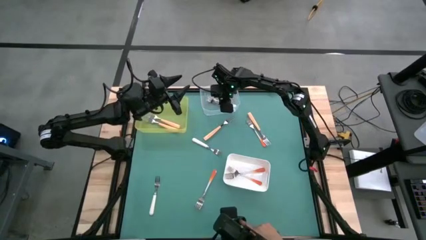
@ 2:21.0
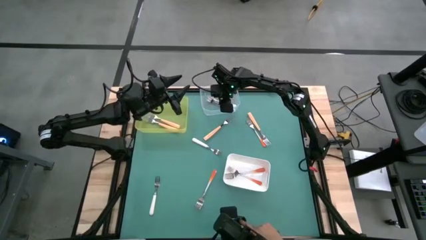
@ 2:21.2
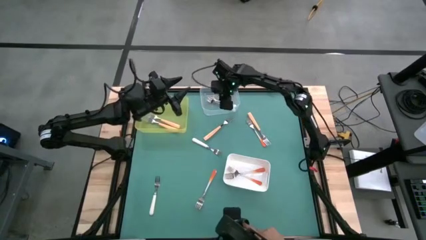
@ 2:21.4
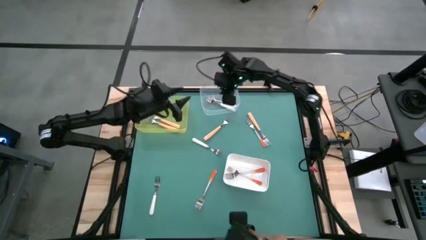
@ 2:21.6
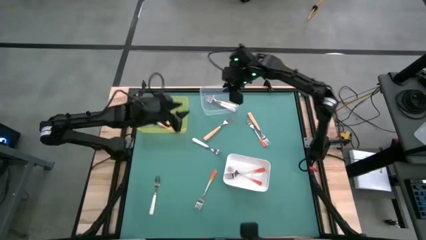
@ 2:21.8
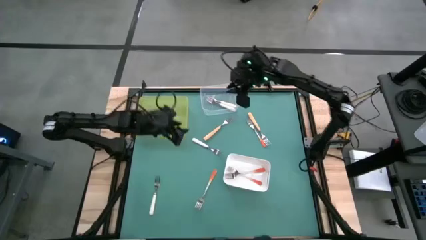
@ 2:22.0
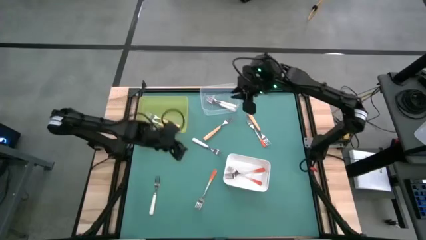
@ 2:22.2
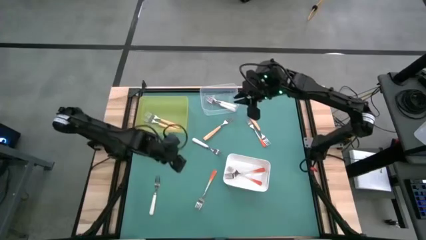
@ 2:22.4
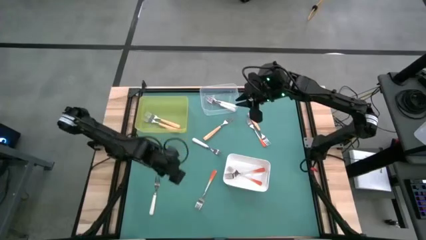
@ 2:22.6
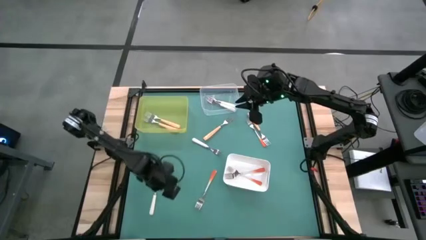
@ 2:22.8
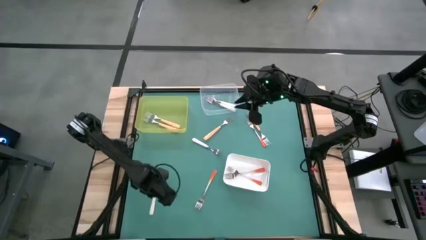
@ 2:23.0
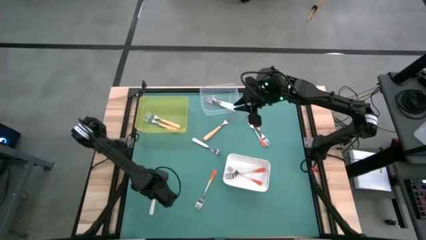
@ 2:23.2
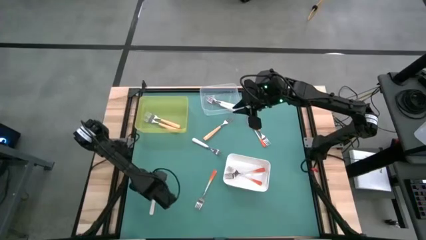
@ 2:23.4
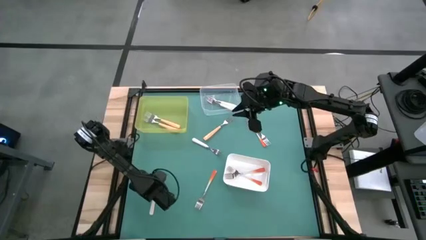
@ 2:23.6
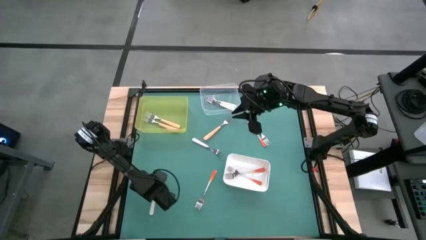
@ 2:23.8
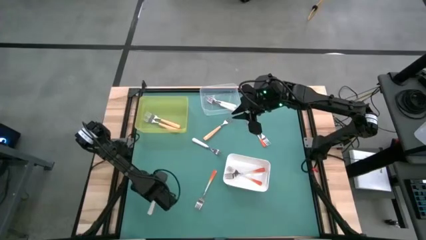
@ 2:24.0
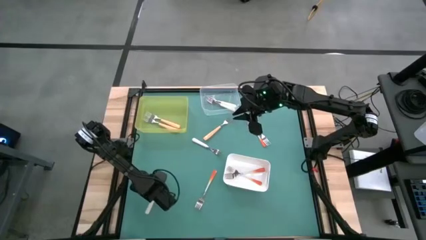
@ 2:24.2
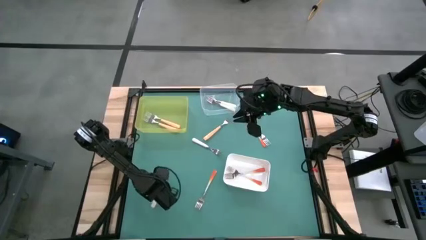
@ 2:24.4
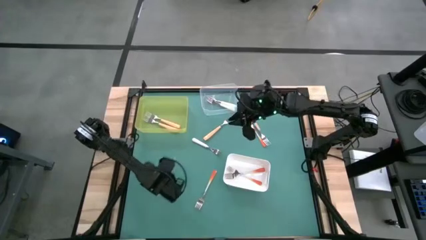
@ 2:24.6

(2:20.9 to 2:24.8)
Task: Sort silverware by color (type)
Put the white fork into the transparent bin

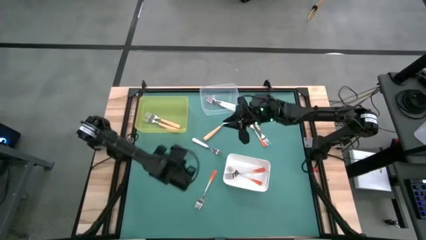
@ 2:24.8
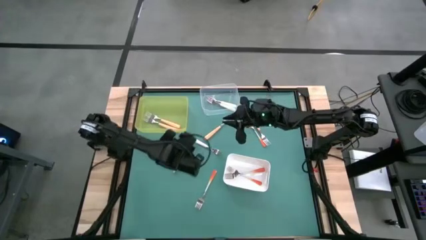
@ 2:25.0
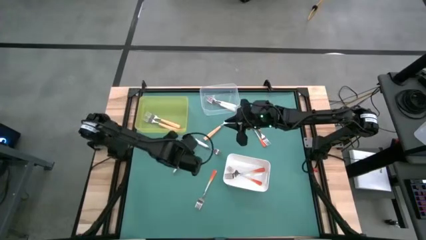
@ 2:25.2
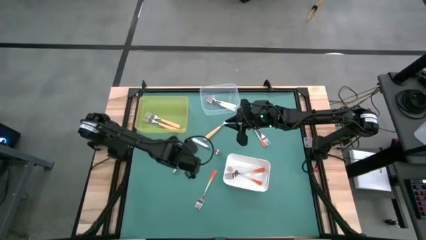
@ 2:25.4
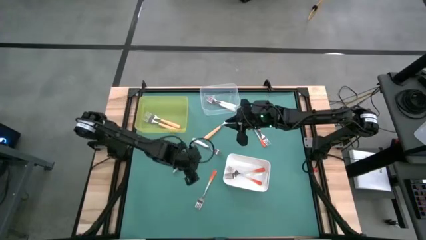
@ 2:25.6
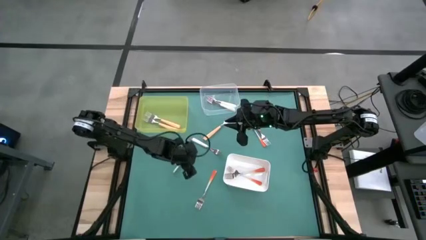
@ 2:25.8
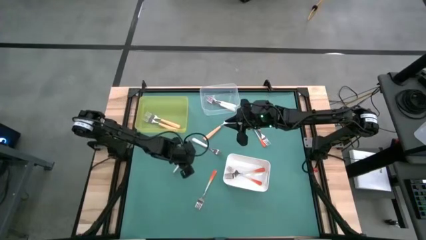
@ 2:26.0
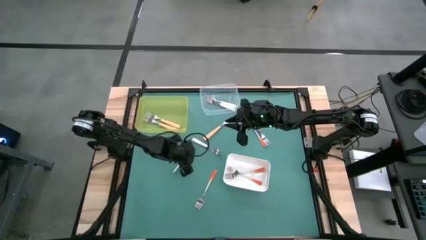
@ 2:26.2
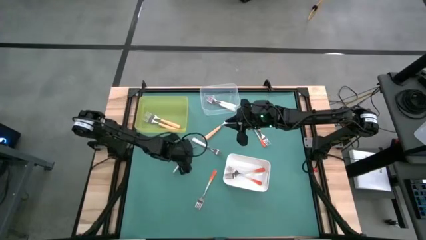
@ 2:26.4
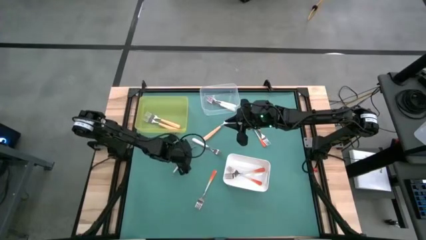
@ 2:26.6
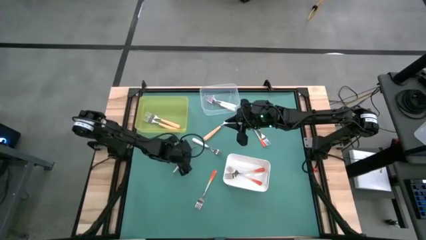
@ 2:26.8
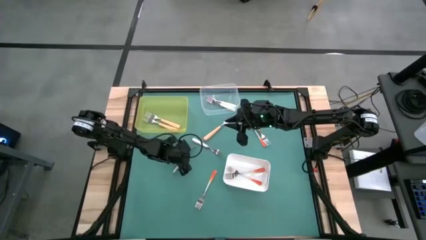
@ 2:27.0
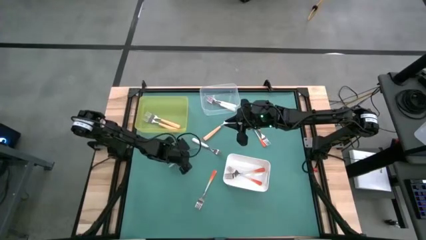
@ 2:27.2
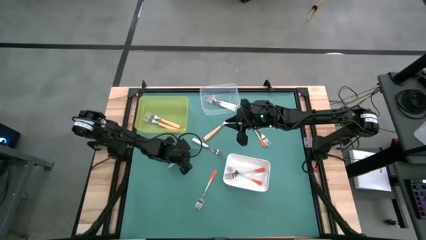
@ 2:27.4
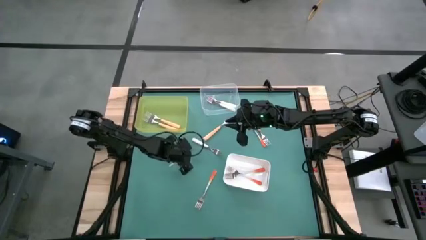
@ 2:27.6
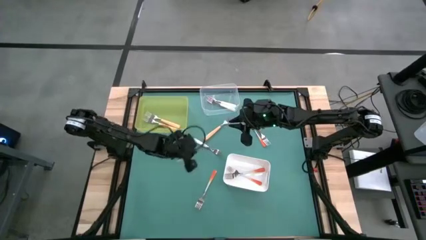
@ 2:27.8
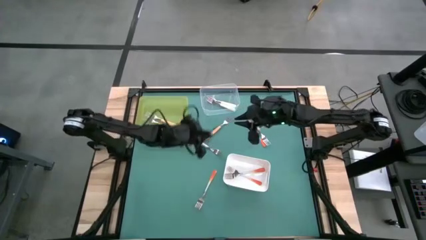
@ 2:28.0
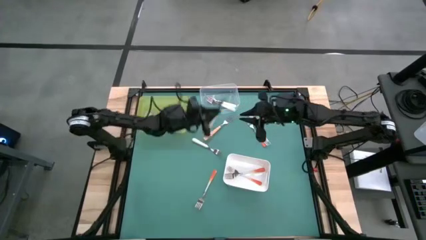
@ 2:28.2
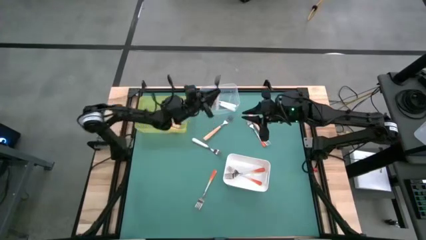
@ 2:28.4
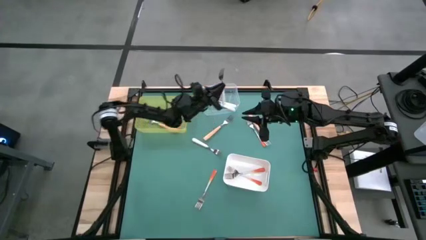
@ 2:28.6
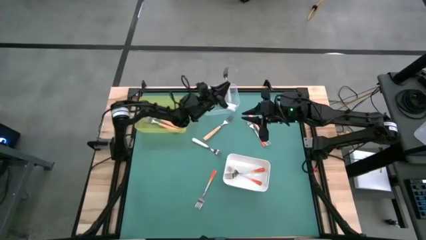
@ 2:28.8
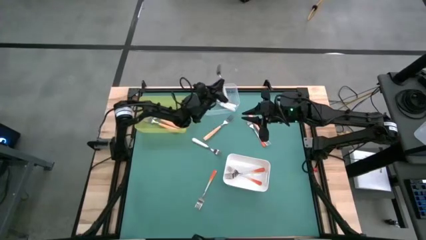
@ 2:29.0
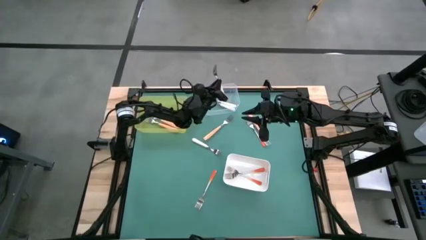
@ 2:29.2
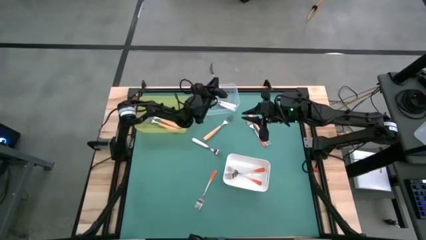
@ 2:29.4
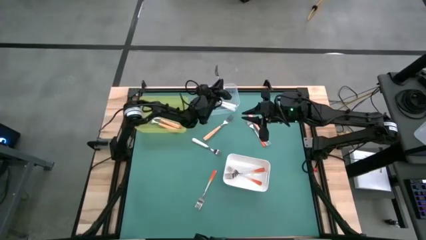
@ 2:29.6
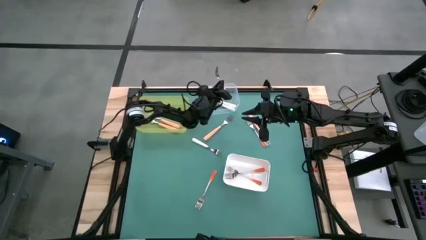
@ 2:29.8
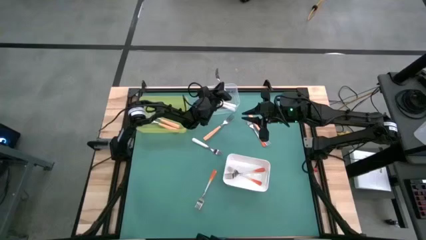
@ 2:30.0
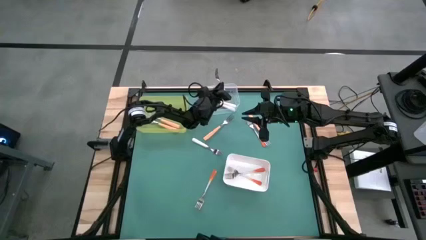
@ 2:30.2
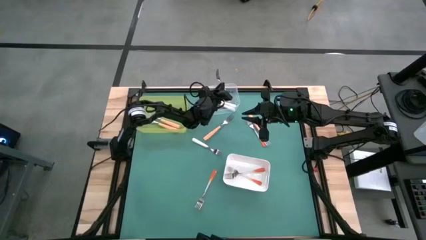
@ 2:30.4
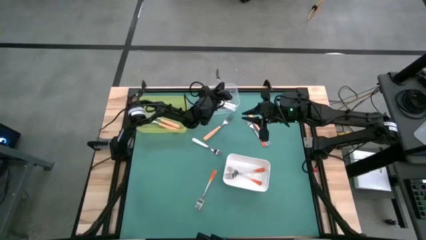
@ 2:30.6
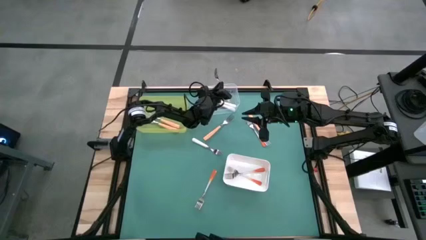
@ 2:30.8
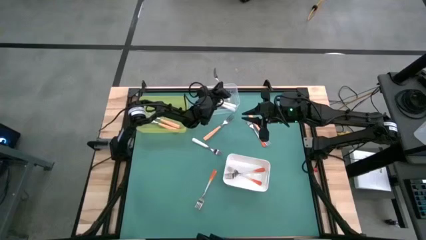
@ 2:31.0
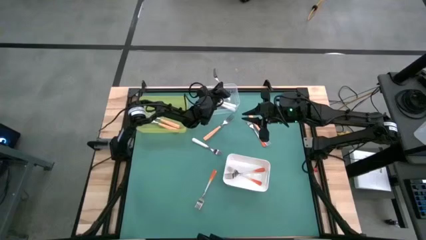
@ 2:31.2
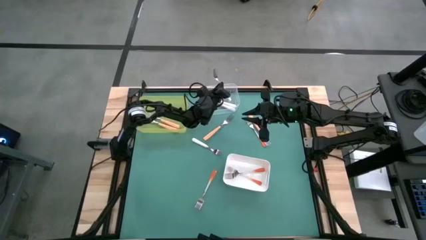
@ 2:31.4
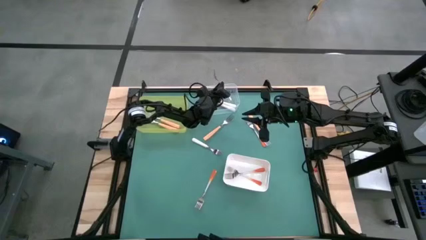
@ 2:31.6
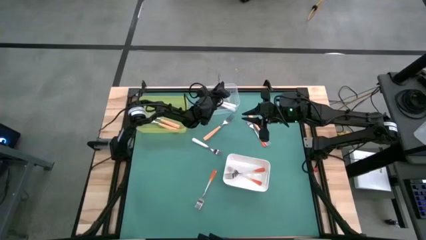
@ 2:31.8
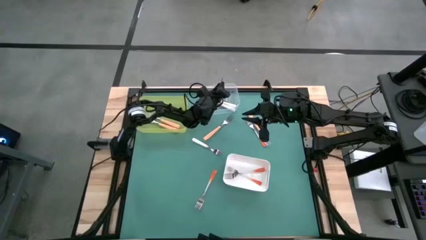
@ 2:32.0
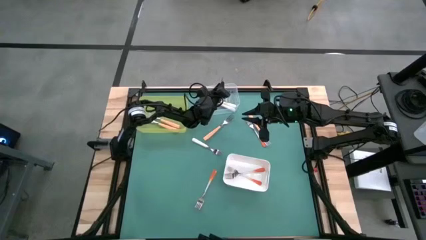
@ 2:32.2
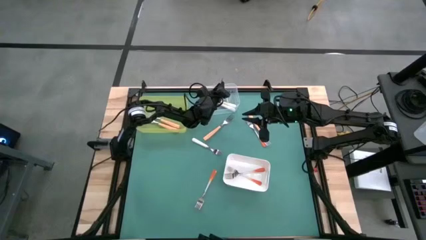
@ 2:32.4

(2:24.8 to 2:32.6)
Put the white fork into the transparent bin

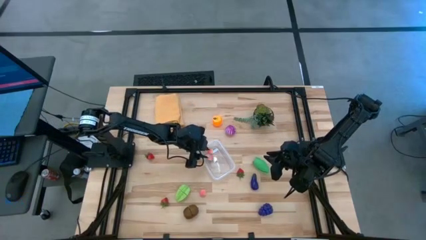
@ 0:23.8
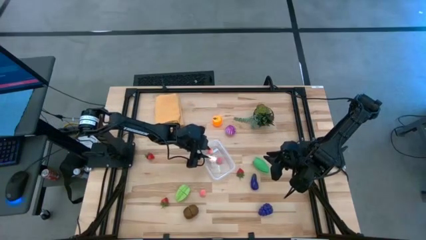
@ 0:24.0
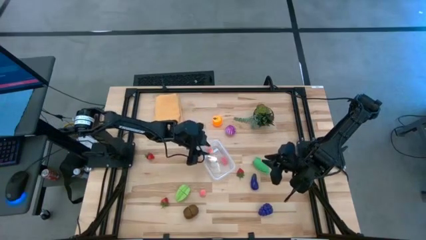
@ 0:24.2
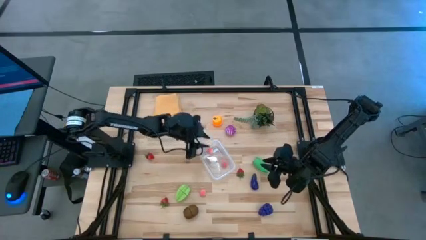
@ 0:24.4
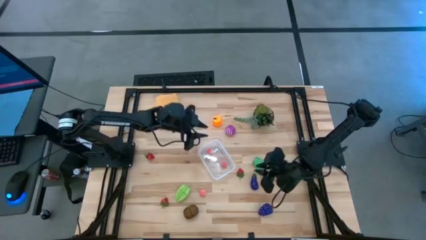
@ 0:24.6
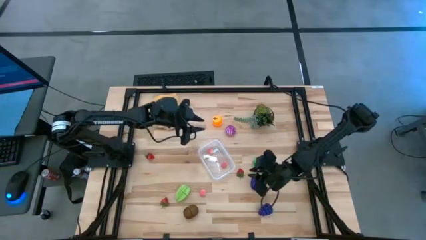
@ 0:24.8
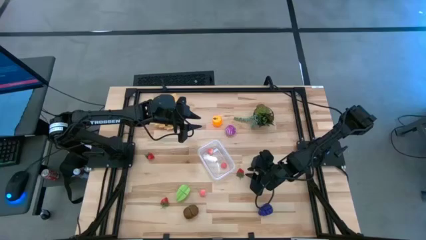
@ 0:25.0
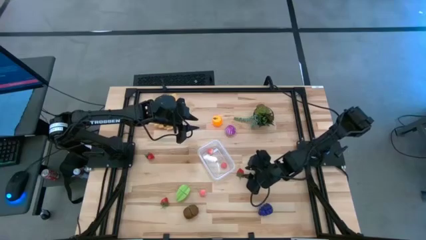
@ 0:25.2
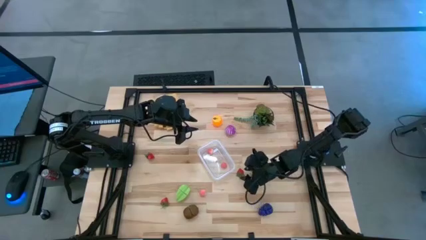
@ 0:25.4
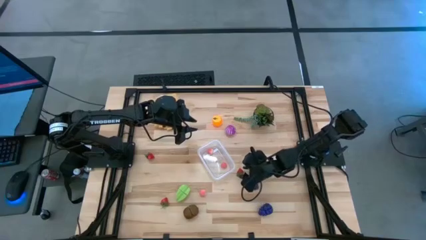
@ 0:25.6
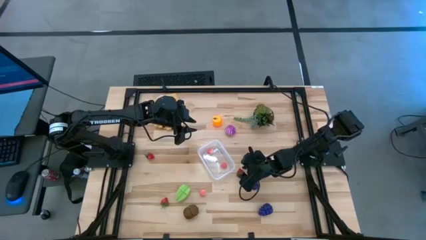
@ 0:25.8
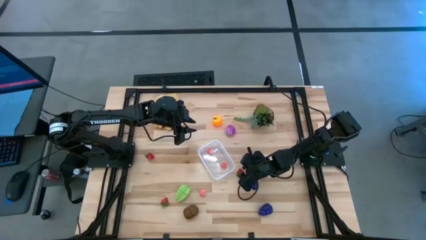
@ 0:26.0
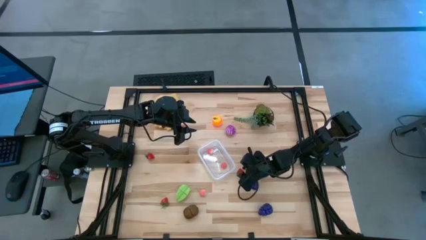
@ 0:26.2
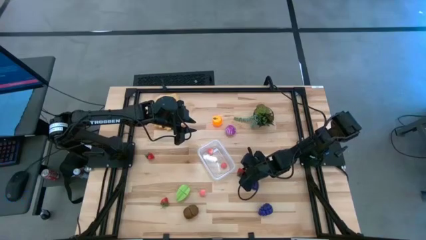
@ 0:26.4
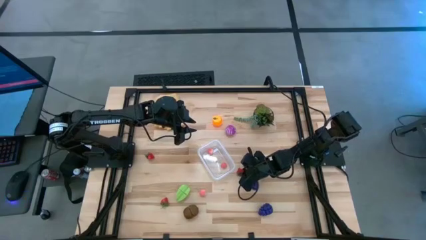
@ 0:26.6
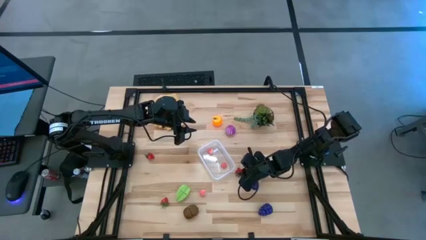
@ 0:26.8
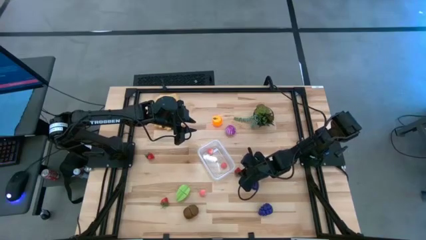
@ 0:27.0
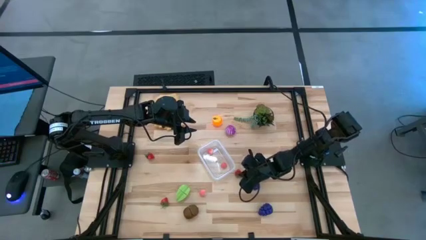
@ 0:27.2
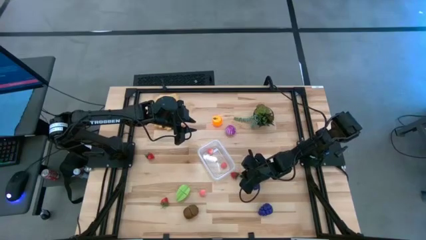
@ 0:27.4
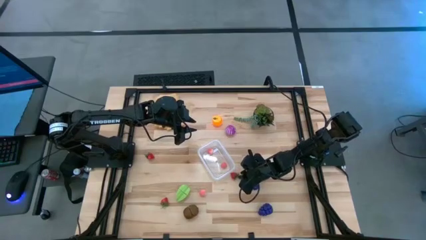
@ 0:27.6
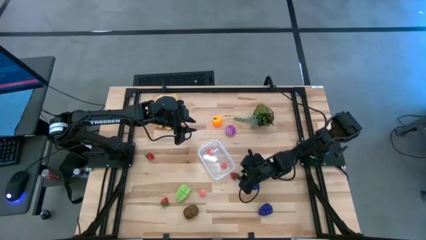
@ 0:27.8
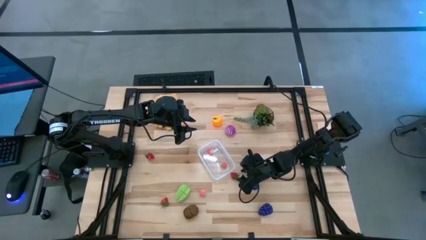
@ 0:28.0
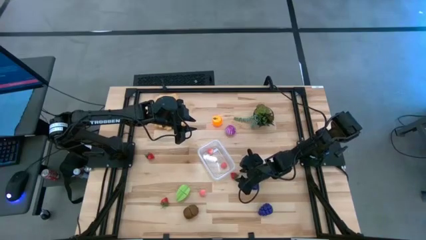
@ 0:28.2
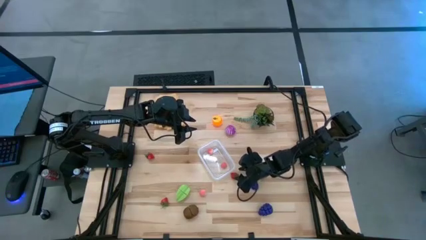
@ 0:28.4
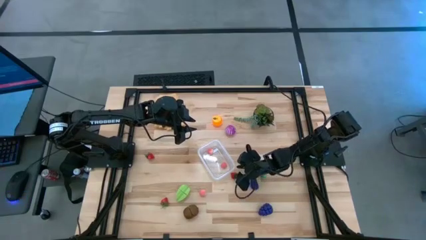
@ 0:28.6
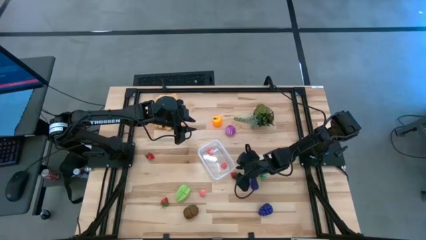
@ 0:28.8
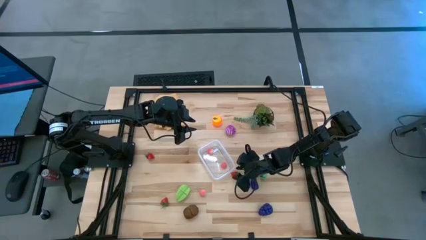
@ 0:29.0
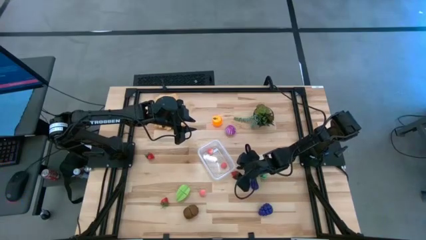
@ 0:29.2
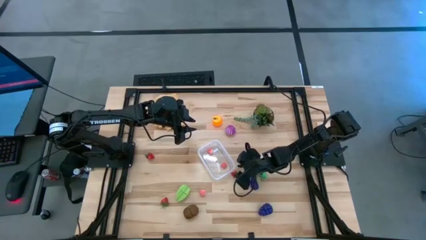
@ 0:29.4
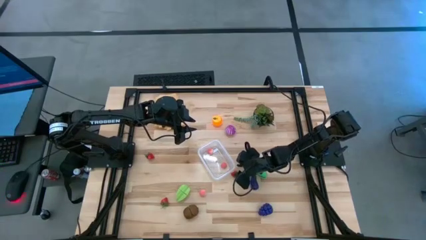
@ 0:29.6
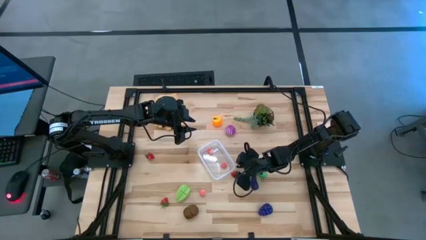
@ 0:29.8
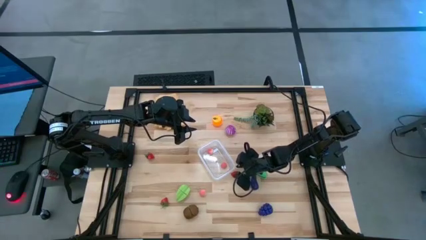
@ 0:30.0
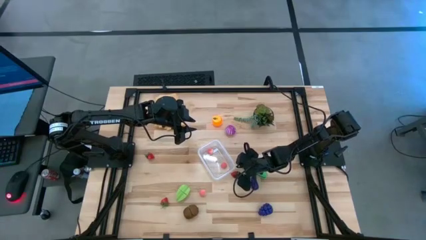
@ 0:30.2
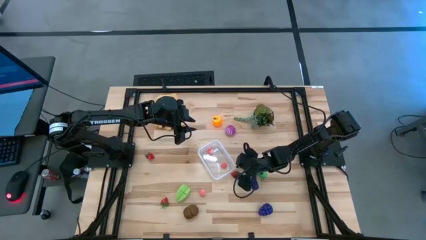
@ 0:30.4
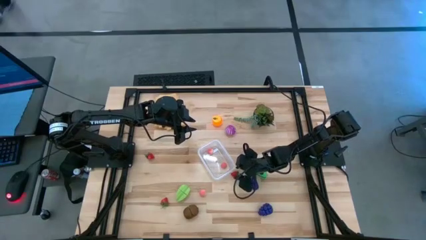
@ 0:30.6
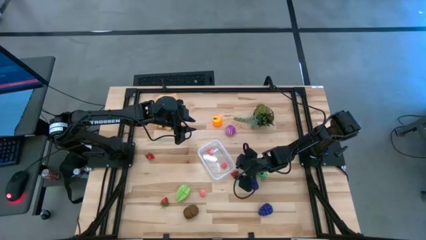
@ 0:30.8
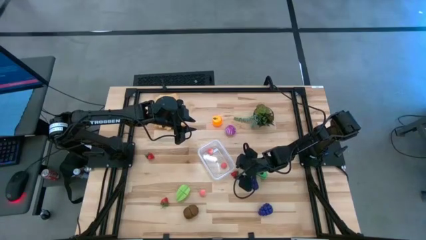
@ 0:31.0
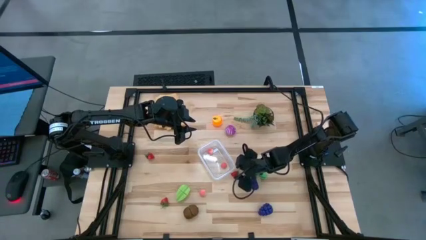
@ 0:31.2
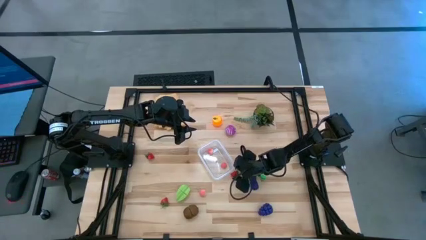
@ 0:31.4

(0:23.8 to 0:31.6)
Task: Pick and placing Produce into tupperware
Put the top right red strawberry into the transparent bin
